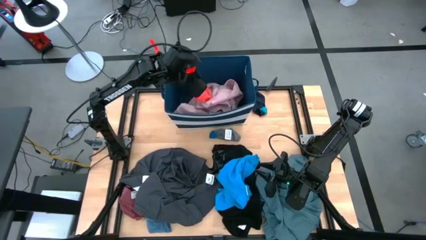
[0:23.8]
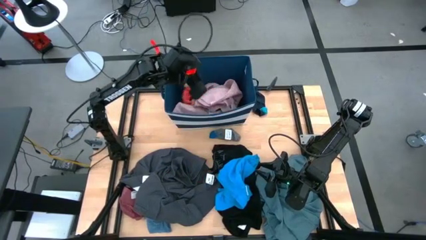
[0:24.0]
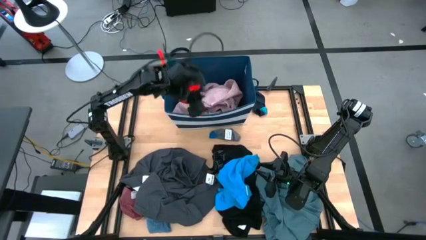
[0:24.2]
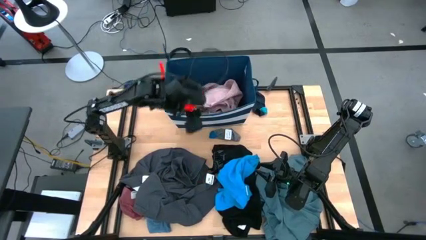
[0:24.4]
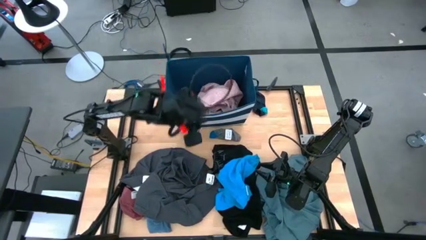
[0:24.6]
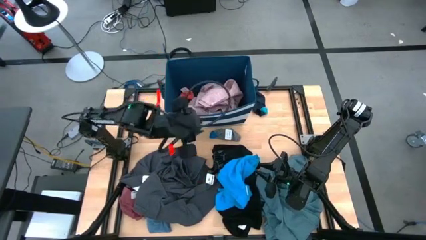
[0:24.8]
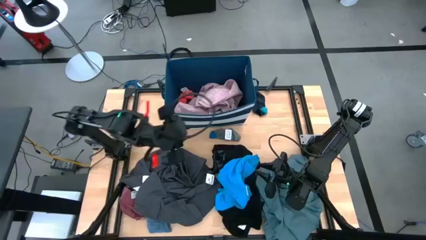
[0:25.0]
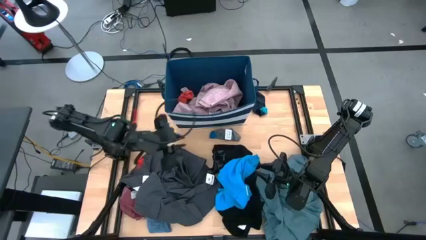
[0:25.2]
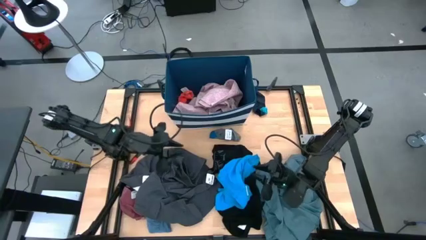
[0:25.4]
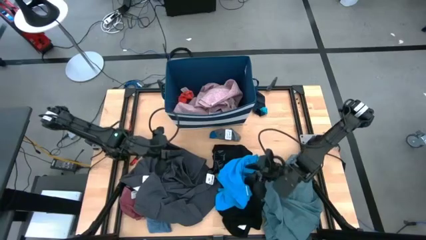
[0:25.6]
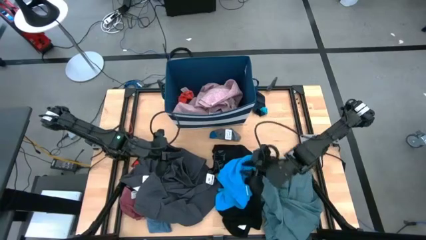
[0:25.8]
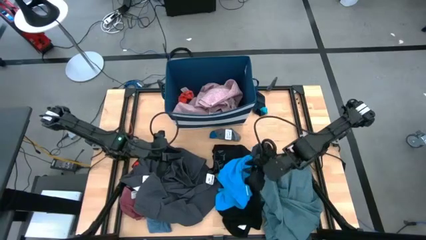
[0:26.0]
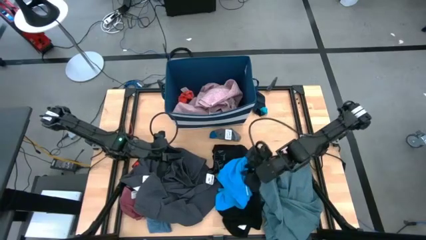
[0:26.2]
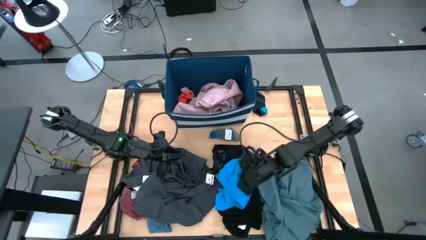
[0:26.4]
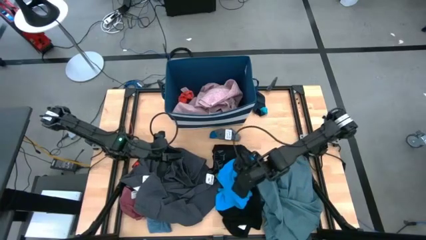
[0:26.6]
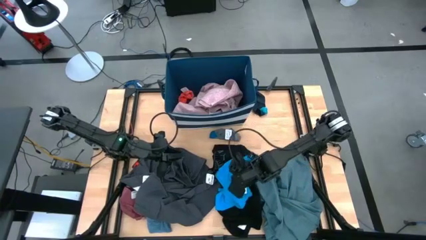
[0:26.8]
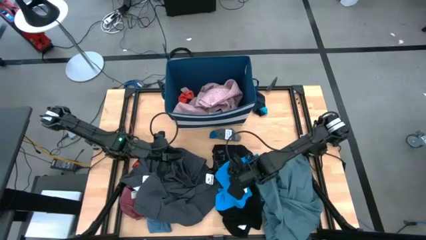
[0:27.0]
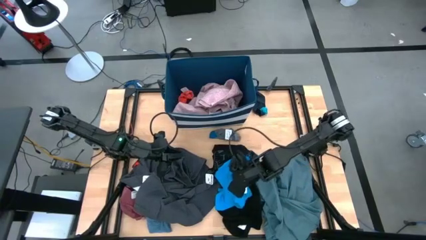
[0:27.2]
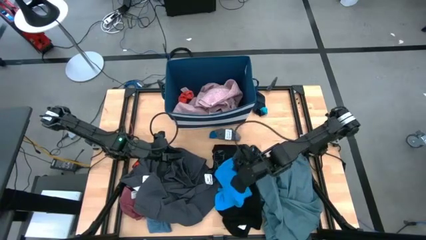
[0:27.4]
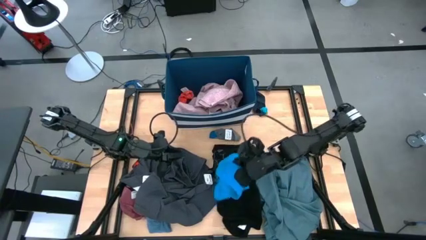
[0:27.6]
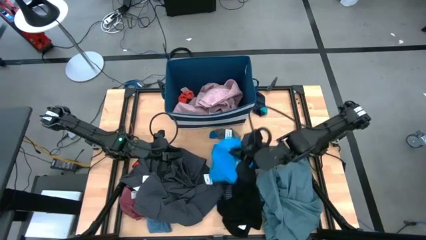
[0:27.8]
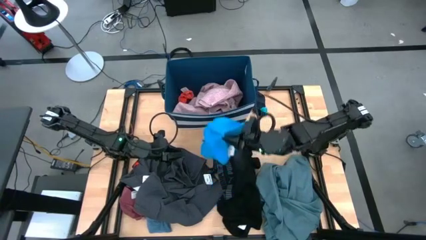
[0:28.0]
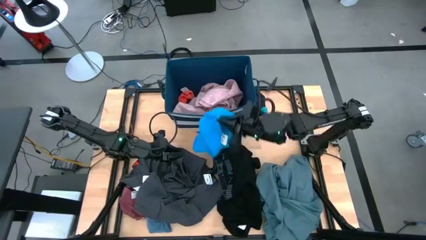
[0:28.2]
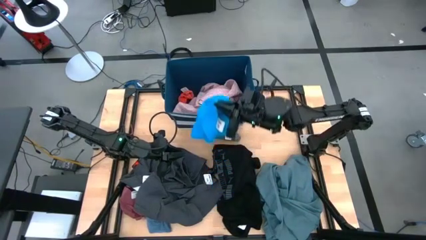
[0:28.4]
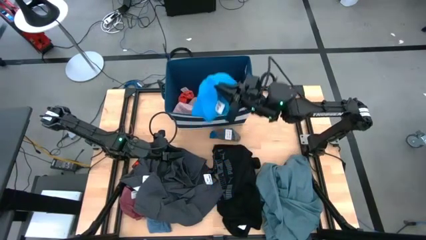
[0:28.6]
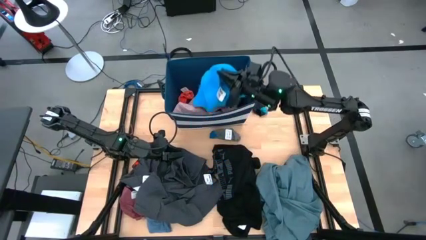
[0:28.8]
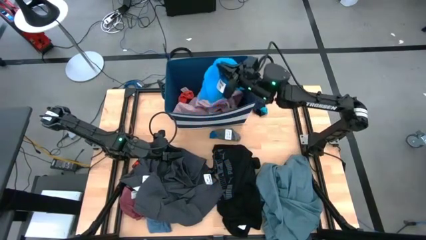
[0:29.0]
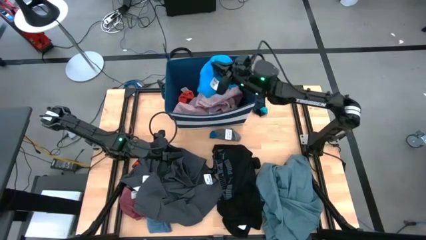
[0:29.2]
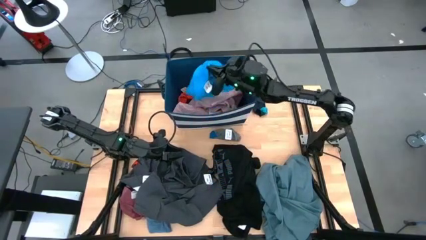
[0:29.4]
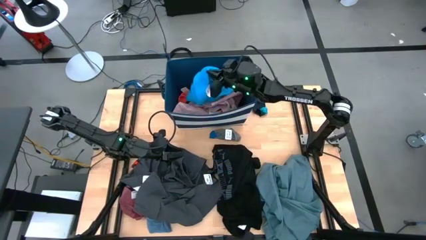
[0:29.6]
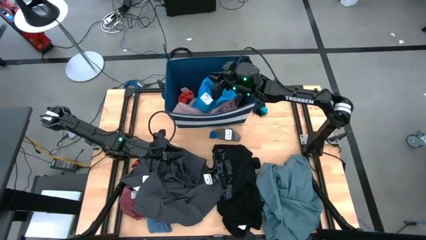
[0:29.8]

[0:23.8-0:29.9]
Task: Sort clothes
Put the blue pants into the laundry organizer

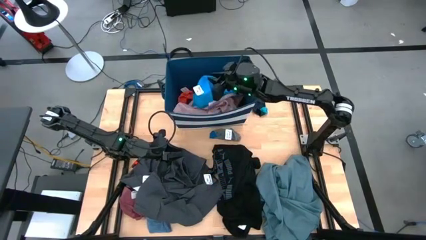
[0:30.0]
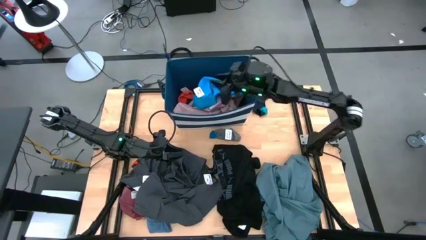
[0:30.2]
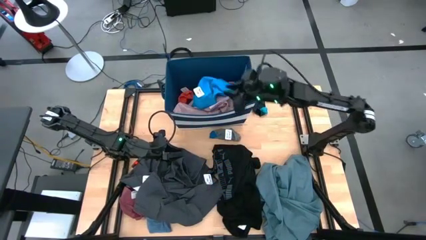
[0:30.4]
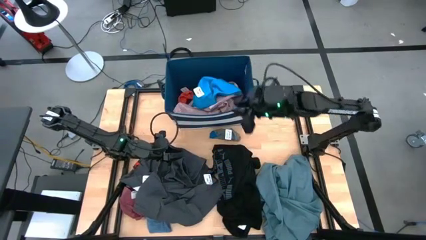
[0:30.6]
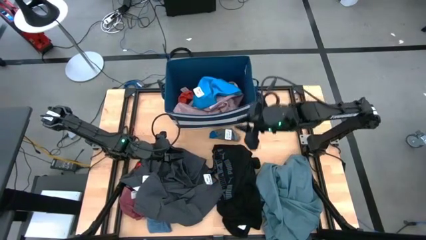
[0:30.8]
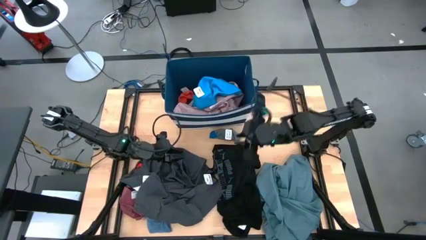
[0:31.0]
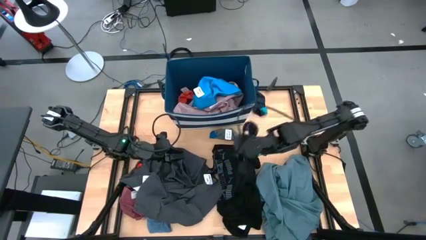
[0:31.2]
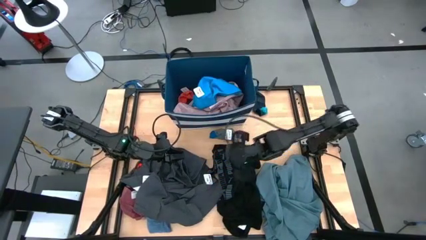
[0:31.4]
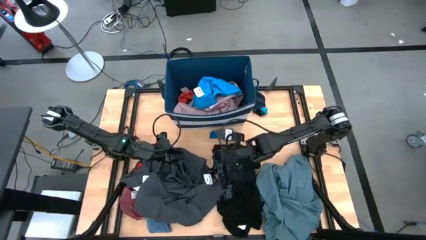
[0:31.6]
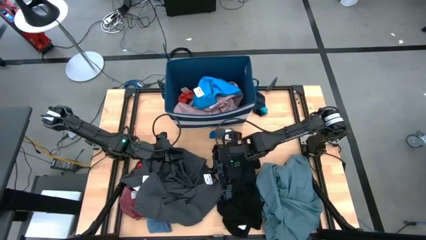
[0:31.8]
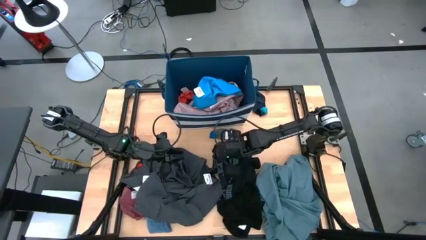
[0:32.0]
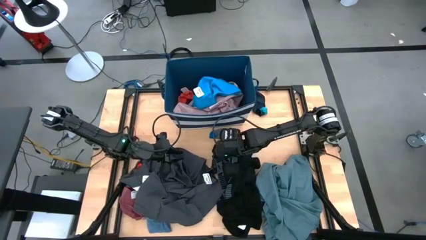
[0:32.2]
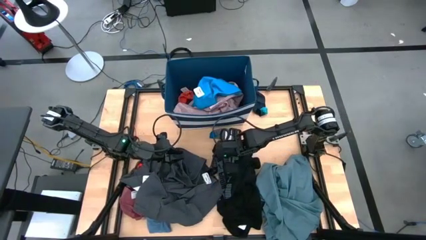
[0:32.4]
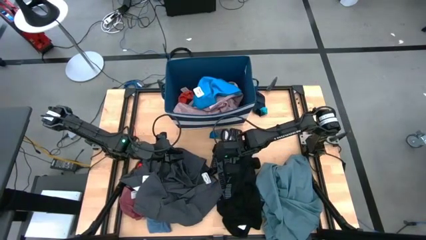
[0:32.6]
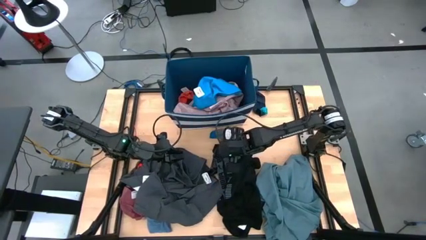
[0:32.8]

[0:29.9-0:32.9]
Put the black boxer into the laundry organizer

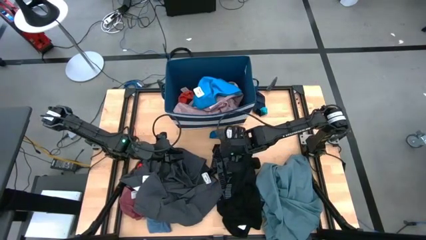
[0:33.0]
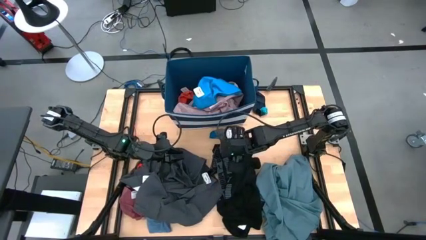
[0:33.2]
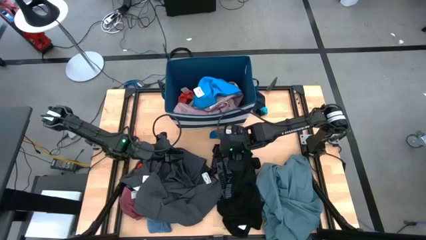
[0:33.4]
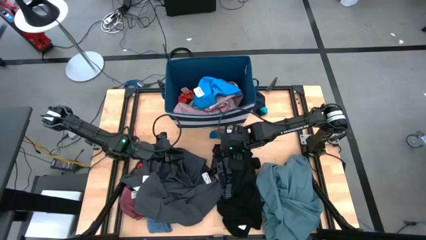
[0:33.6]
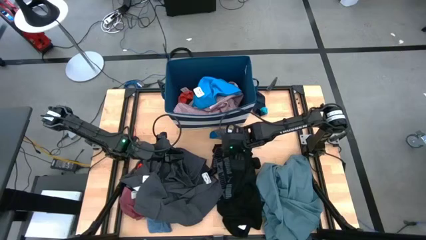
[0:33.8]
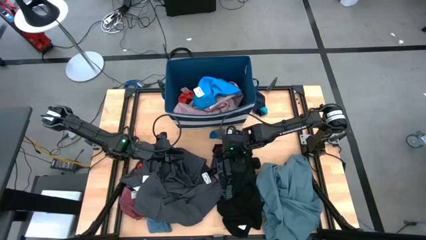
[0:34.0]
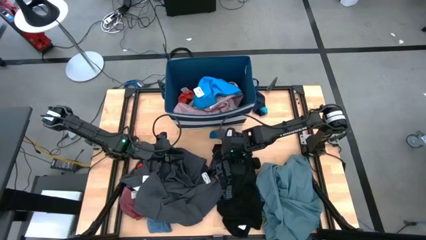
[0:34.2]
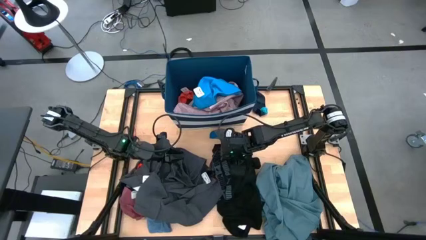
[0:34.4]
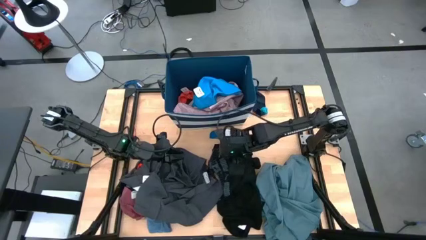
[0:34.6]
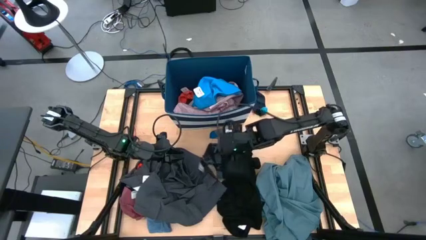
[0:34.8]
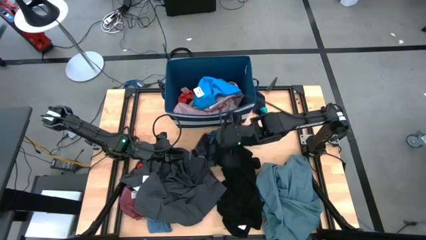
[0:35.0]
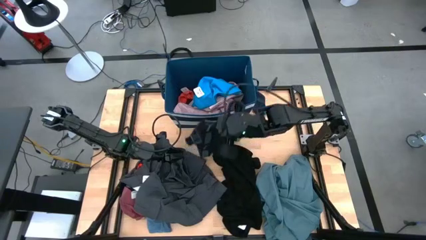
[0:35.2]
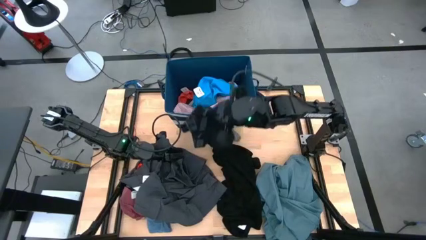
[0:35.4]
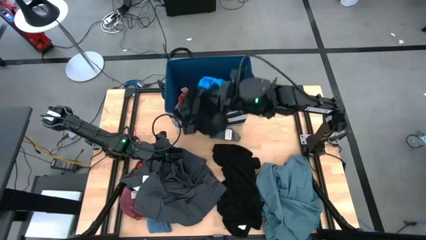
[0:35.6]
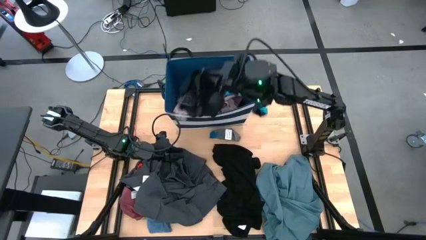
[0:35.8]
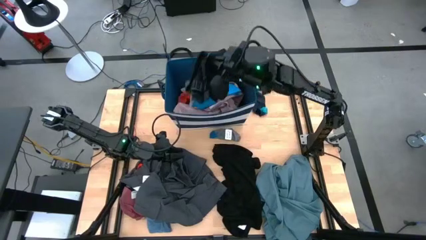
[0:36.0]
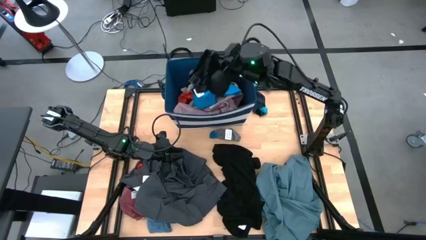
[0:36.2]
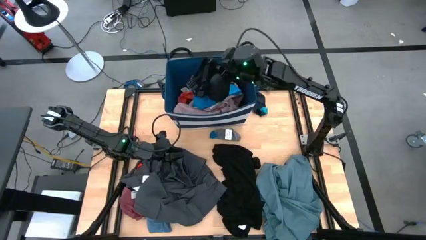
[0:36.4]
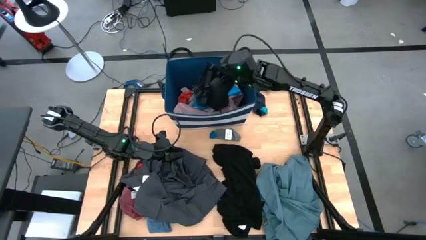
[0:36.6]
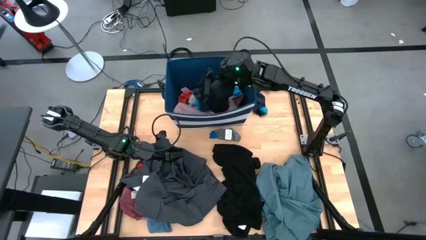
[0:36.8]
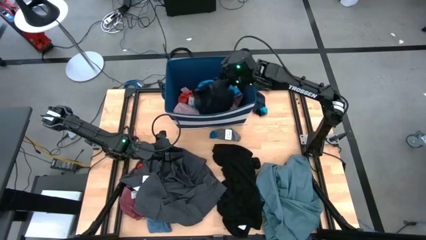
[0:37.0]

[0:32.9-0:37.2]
Put the black boxer into the laundry organizer

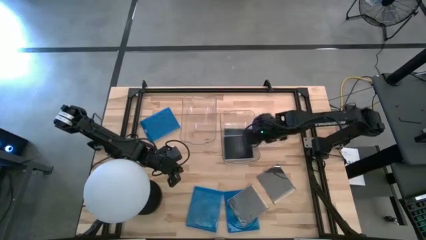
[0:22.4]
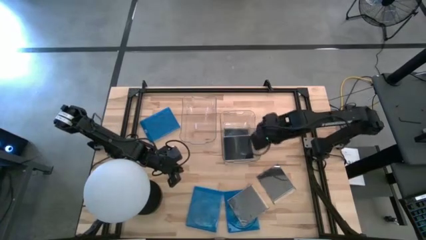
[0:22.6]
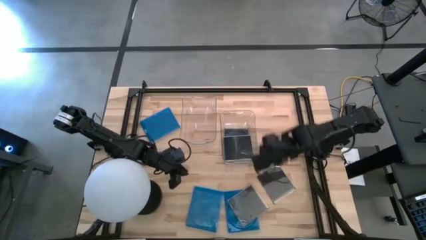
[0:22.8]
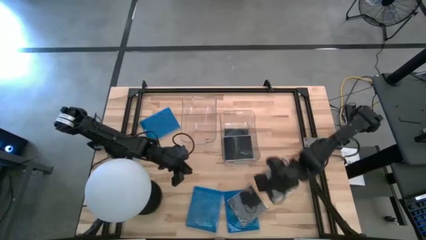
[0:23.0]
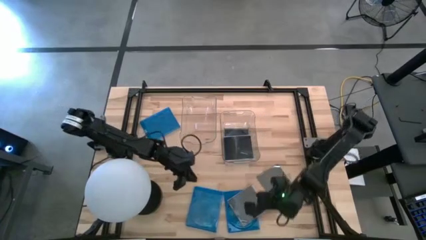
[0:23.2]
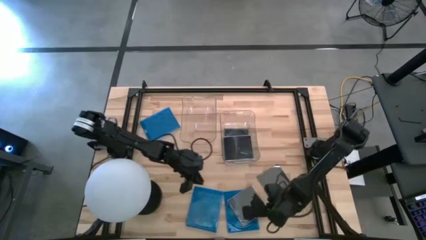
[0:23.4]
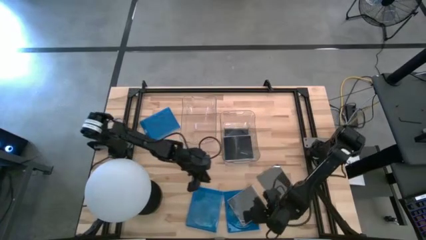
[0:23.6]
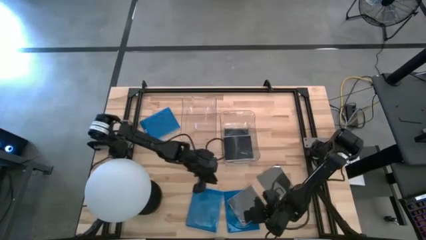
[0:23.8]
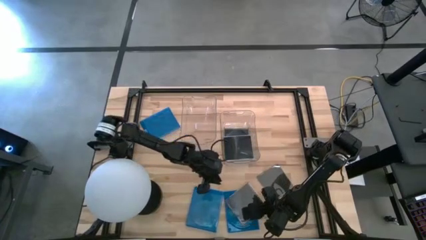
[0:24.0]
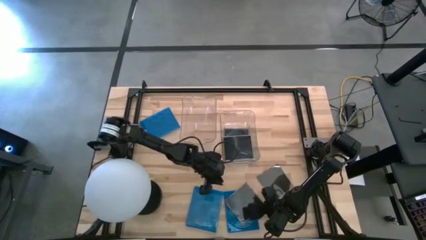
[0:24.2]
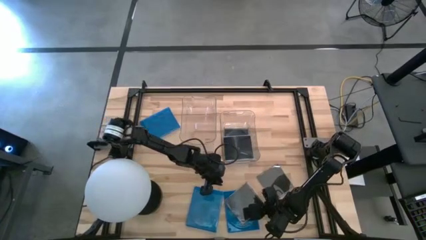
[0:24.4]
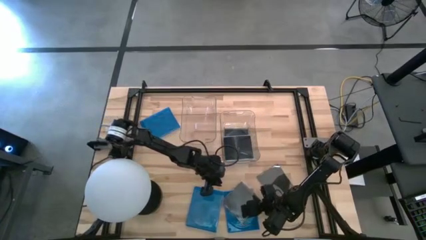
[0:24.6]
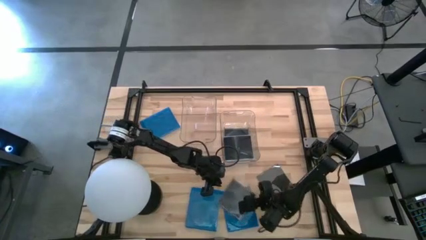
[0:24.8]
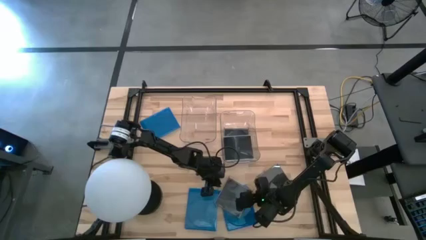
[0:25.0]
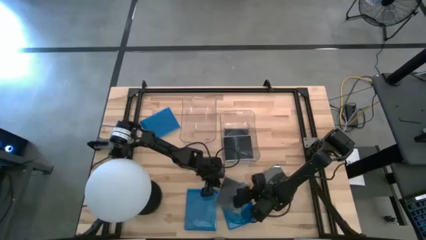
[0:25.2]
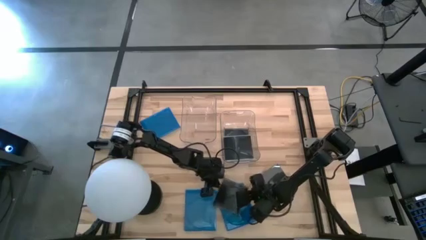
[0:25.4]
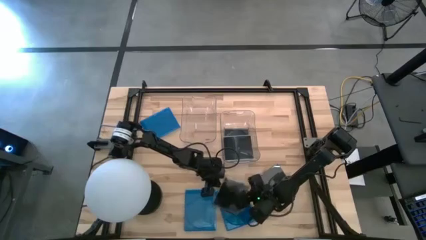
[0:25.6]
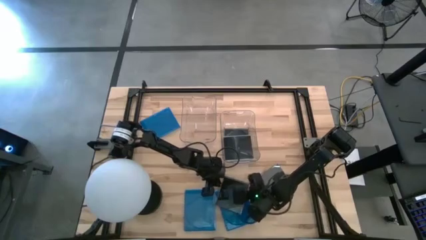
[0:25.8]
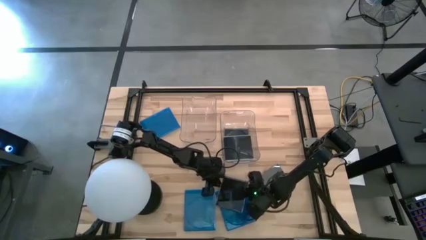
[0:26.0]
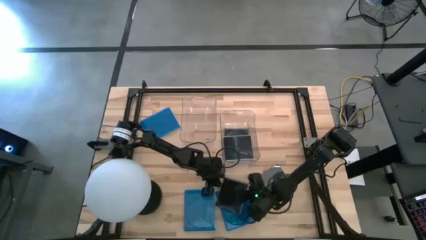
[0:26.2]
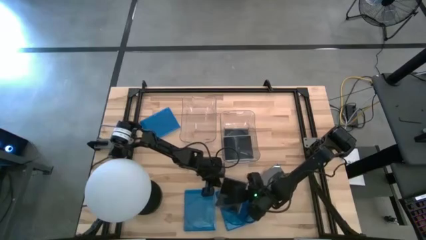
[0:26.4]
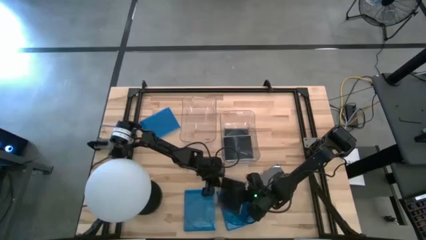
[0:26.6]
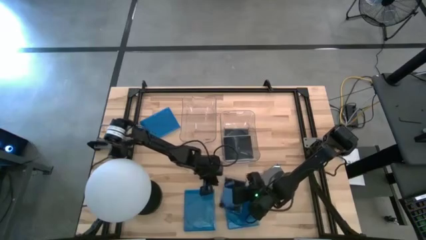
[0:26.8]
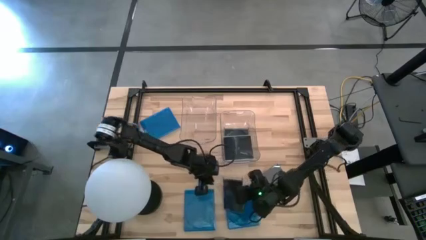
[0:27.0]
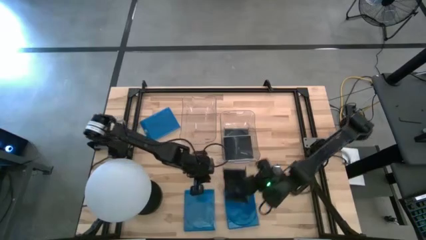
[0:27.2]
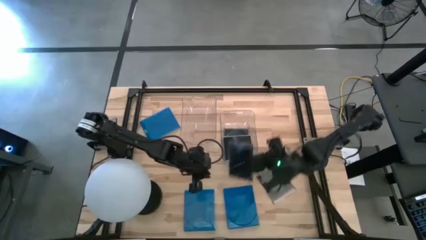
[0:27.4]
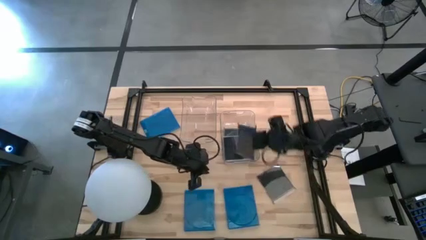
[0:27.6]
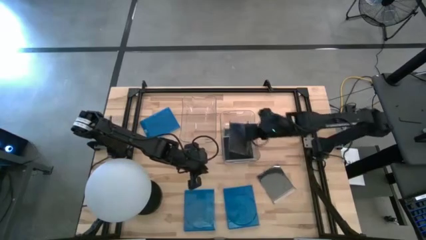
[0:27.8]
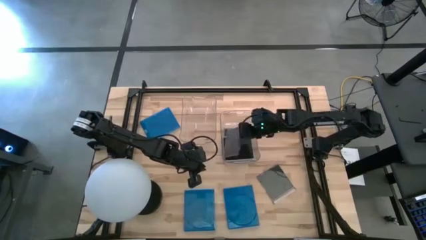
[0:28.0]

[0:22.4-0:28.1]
Task: Pick & place jewel cases by type
Put the black CD case into the right transparent bin
